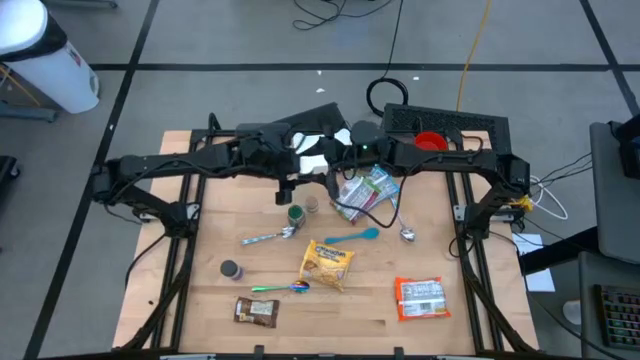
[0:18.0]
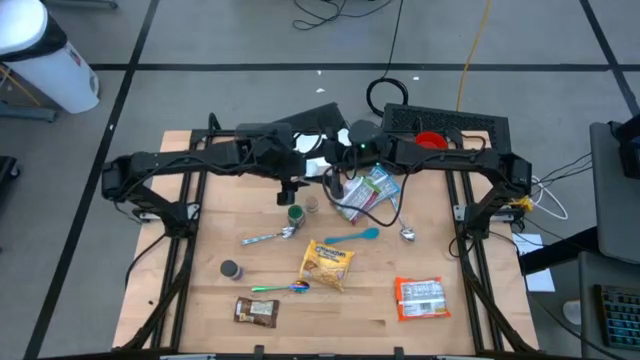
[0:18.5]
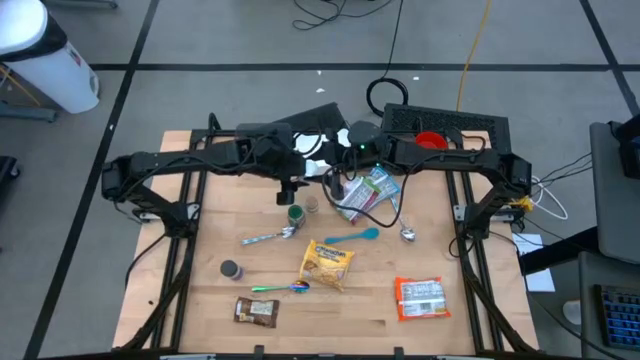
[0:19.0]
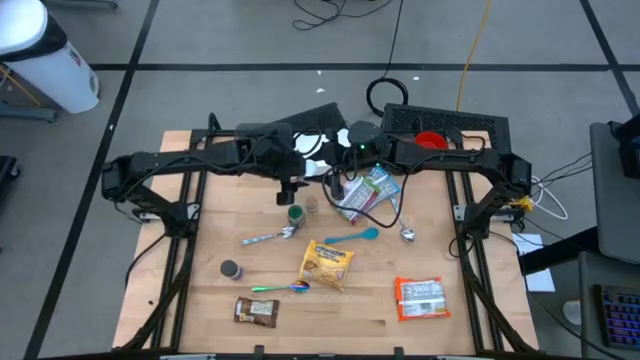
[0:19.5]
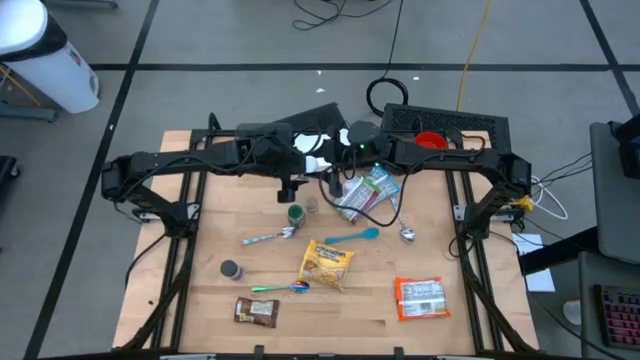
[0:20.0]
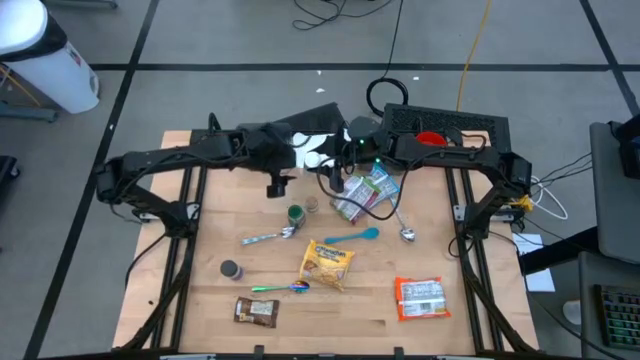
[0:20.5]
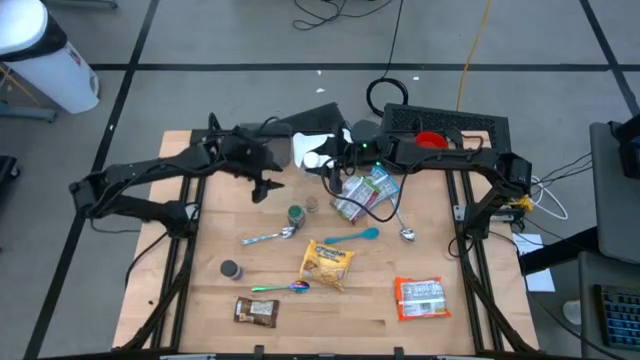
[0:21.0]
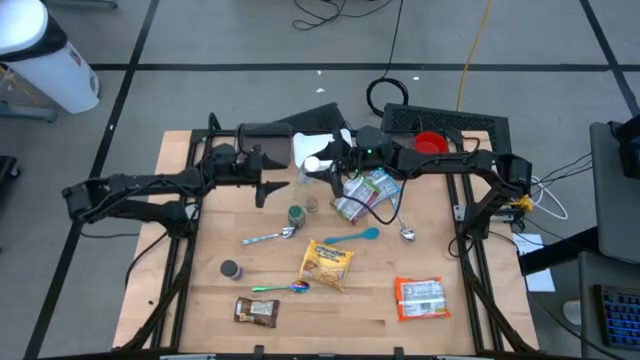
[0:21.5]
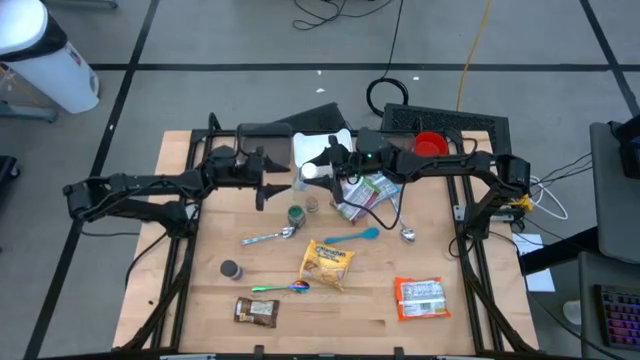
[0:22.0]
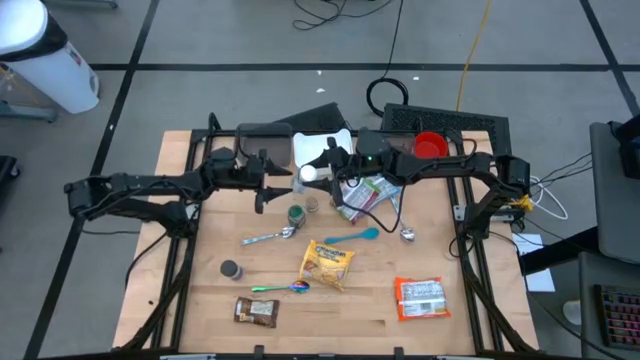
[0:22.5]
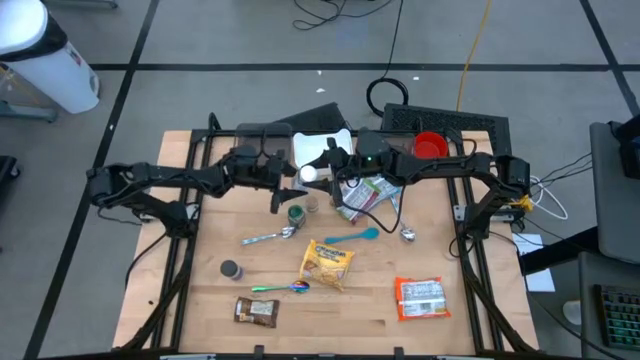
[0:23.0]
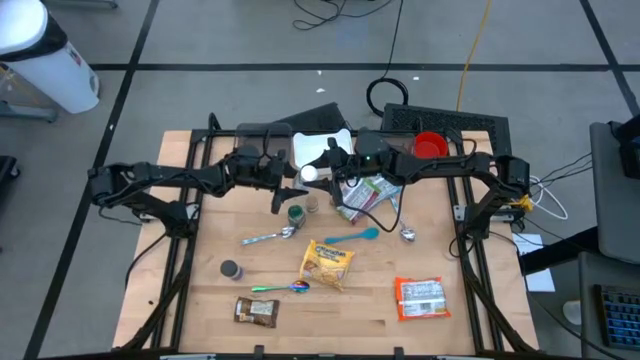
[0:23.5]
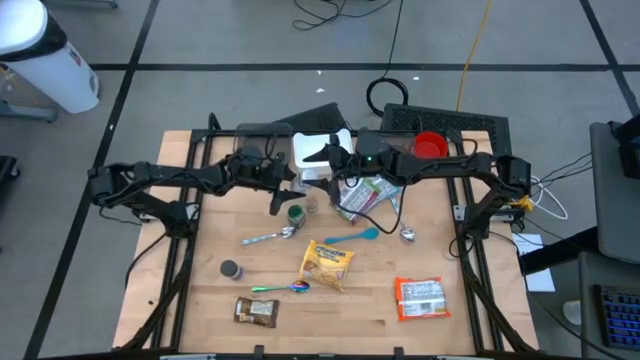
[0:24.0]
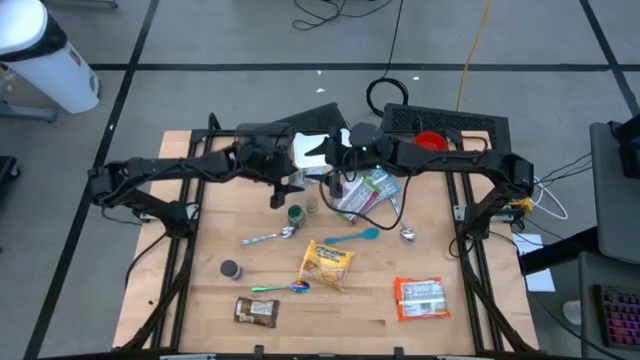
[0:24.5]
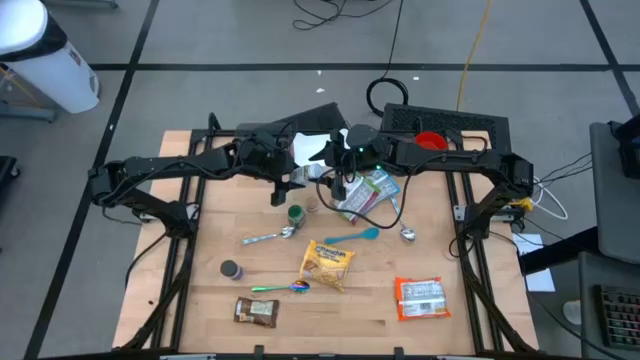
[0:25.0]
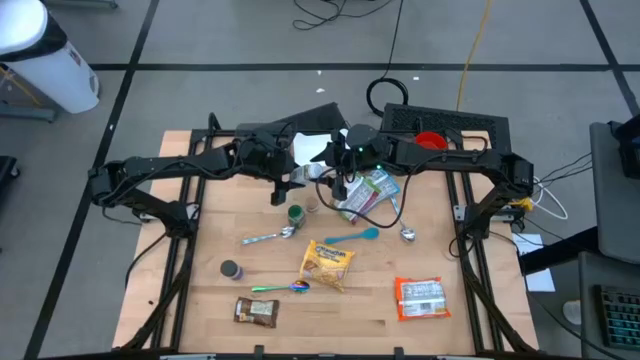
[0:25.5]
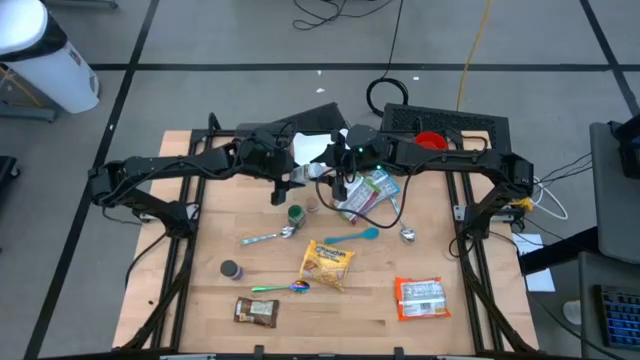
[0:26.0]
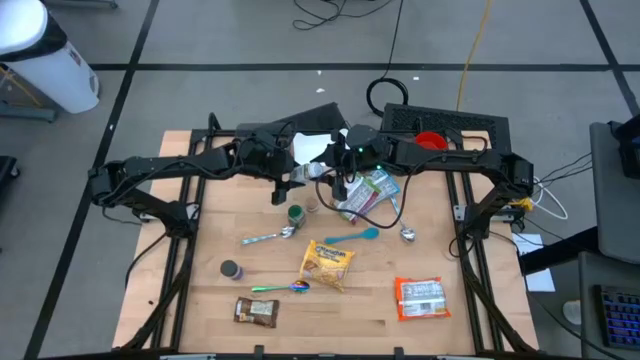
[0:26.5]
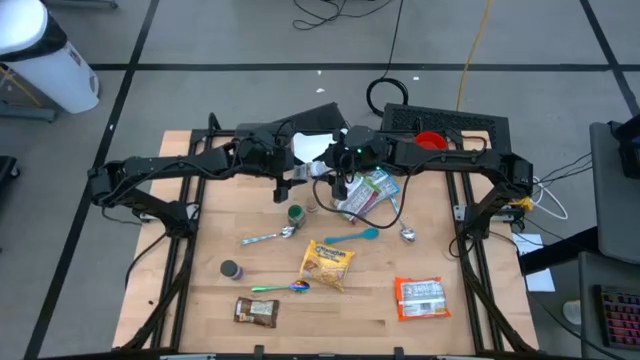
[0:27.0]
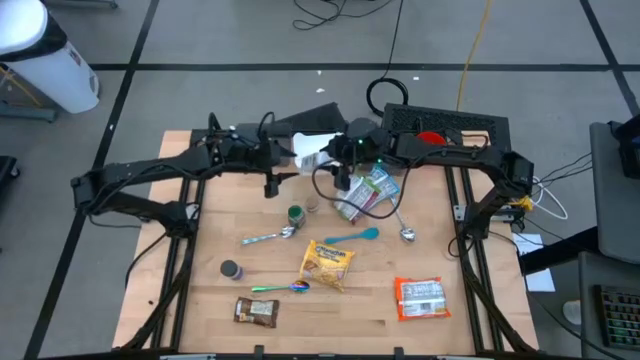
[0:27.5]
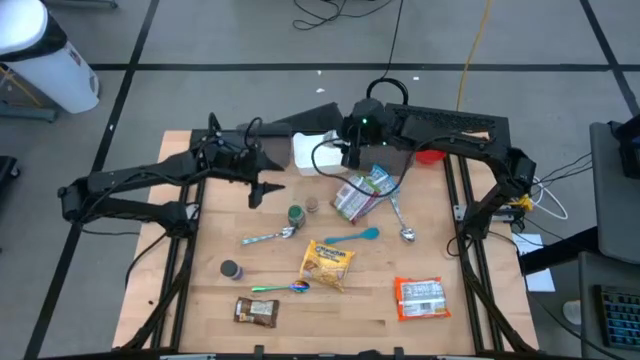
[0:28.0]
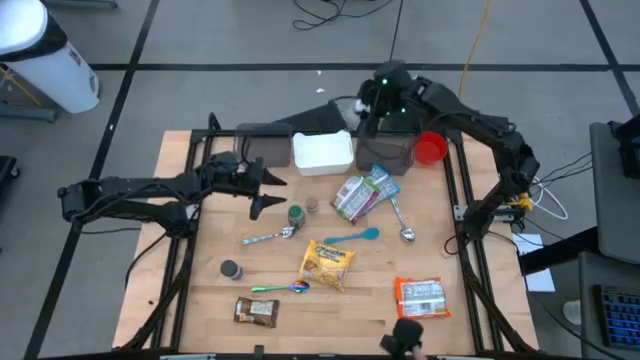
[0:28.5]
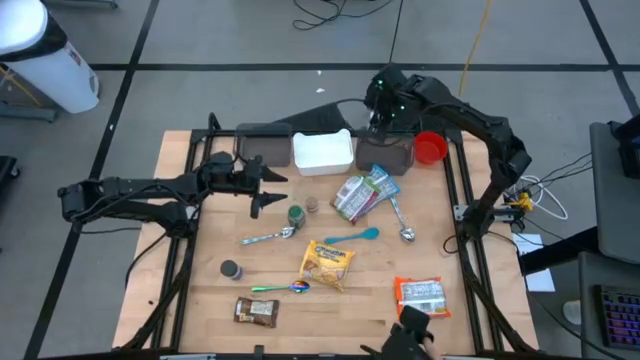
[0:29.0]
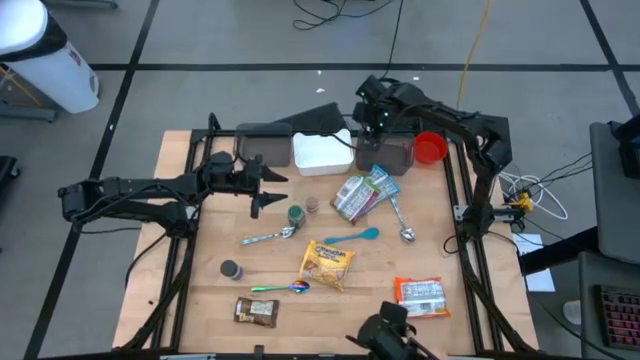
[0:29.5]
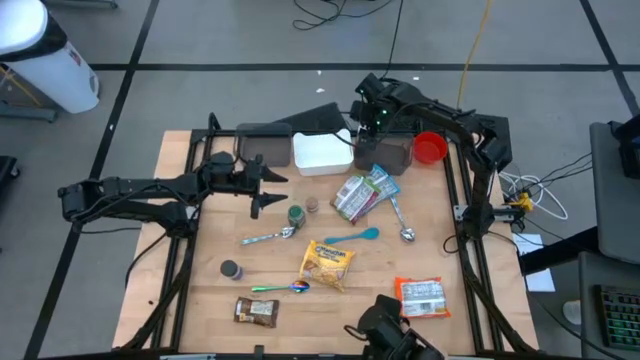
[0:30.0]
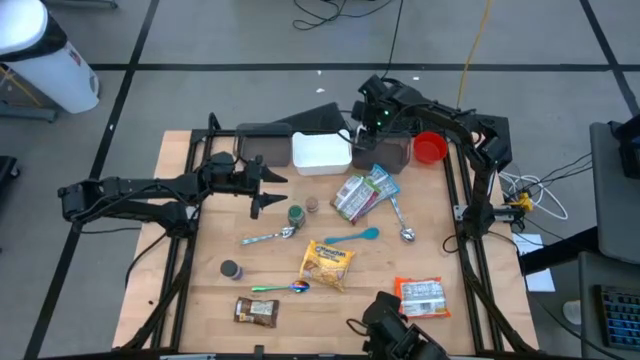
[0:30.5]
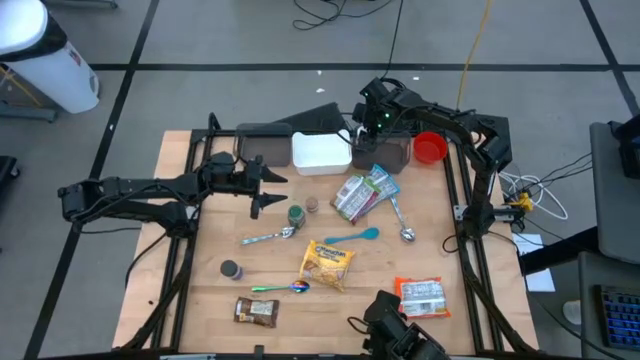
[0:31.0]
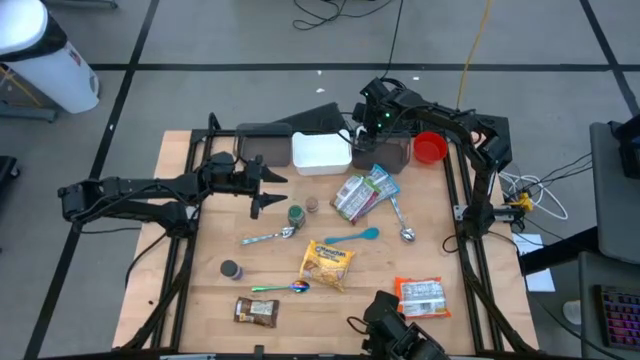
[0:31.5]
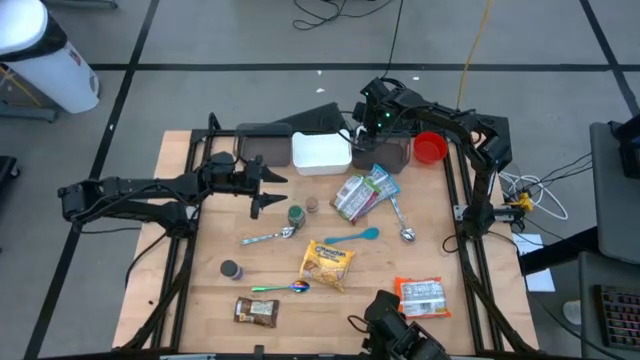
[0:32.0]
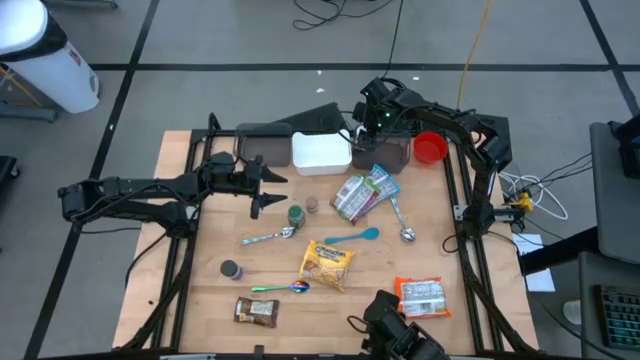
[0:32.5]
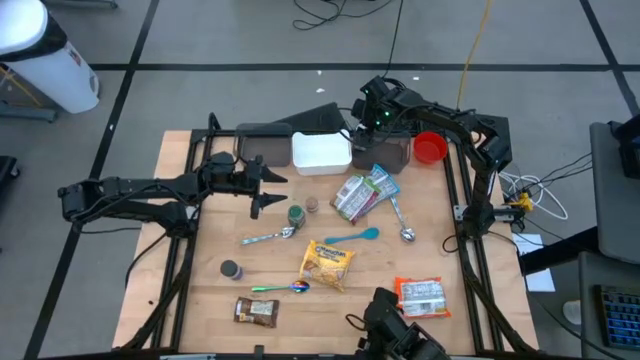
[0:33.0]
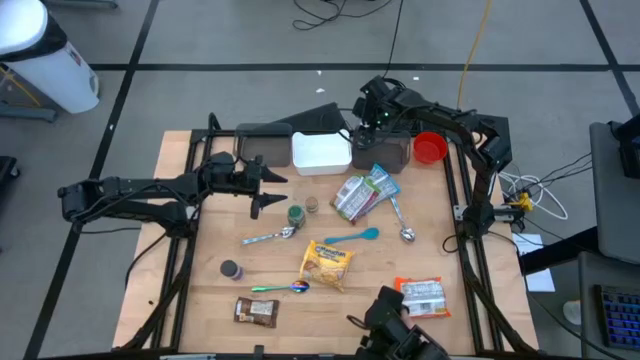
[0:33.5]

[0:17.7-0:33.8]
Task: Pick & Place Food Item
Put the white seasoning bottle into the right black bin

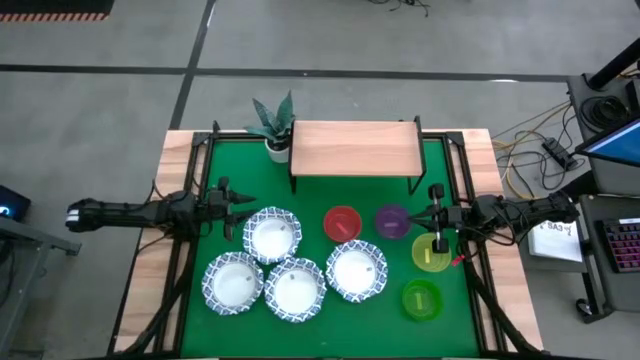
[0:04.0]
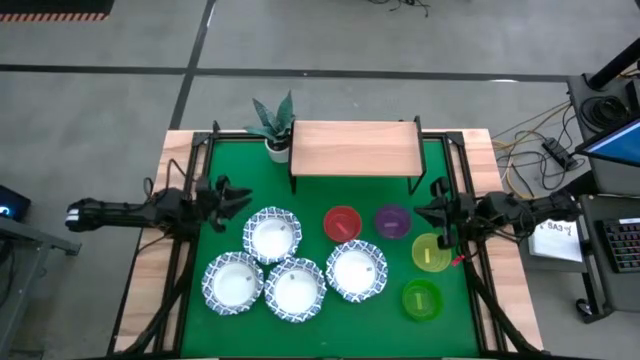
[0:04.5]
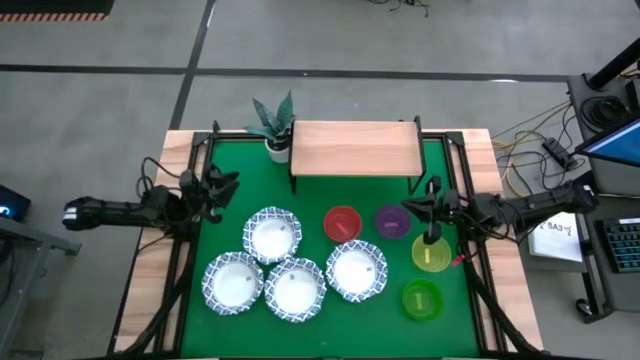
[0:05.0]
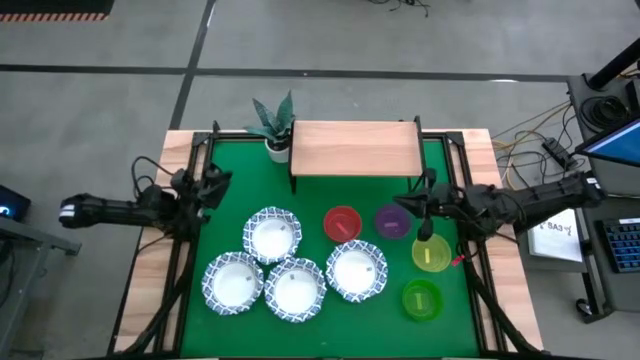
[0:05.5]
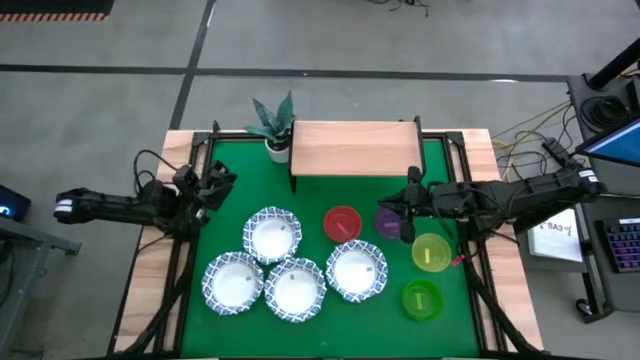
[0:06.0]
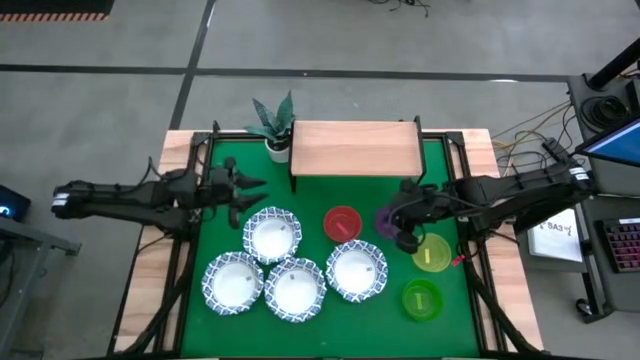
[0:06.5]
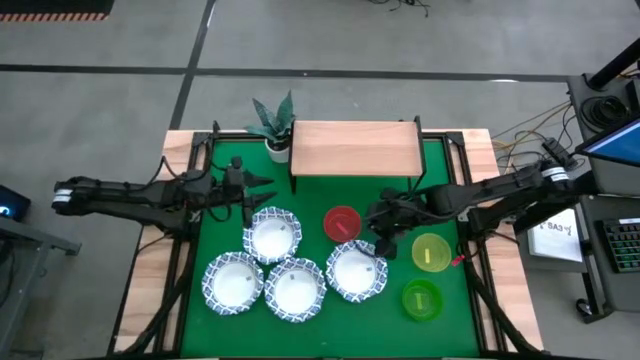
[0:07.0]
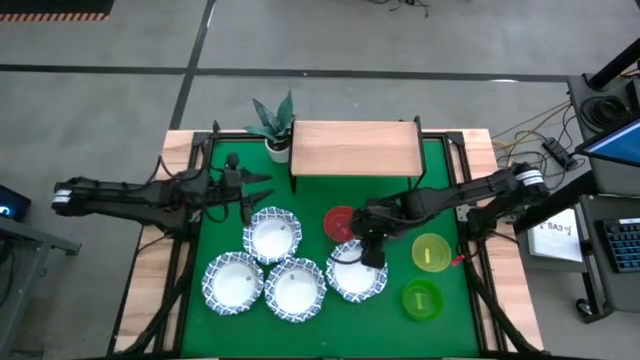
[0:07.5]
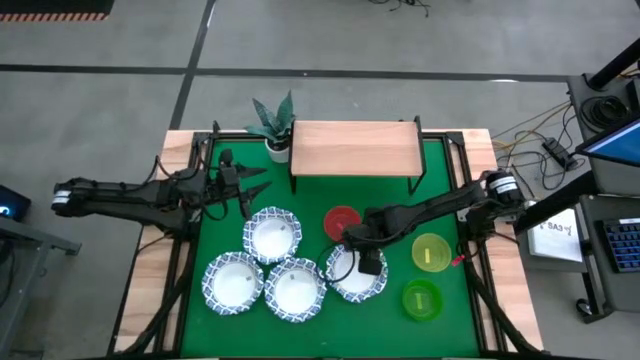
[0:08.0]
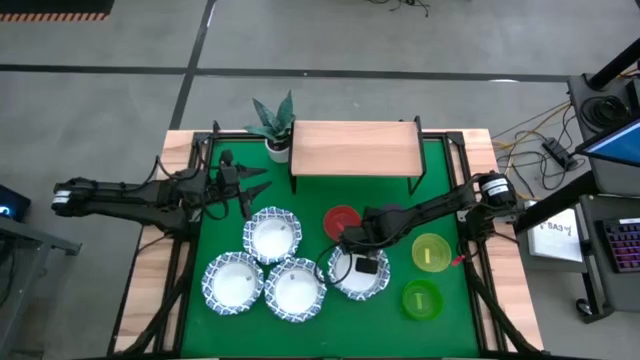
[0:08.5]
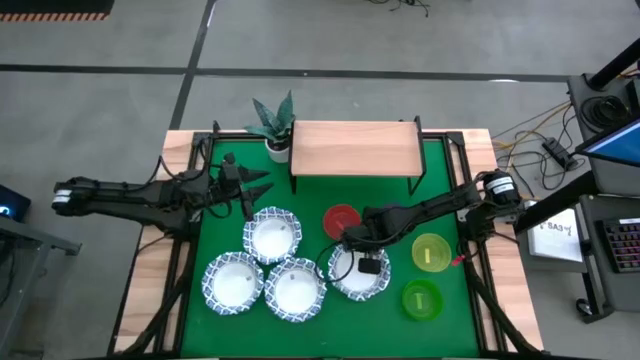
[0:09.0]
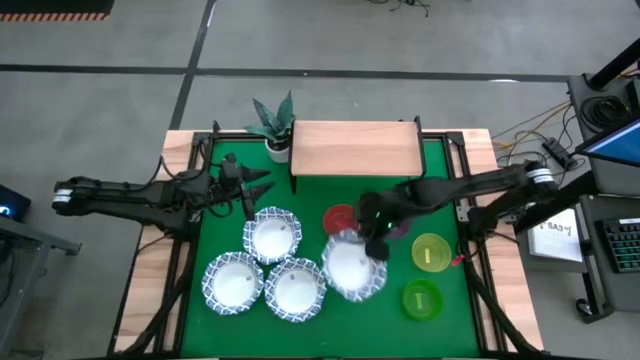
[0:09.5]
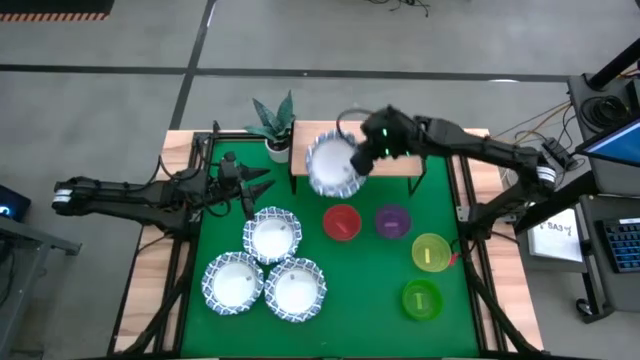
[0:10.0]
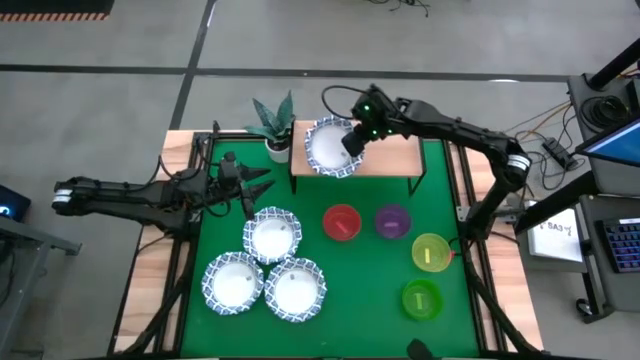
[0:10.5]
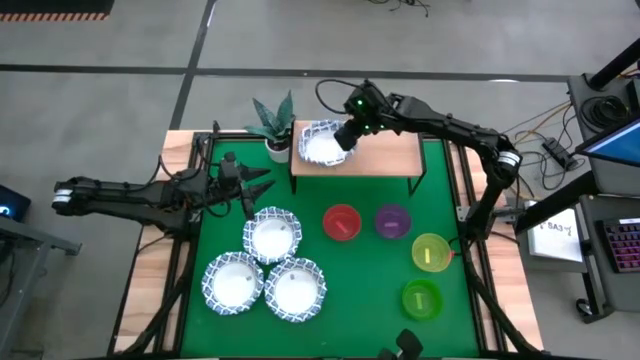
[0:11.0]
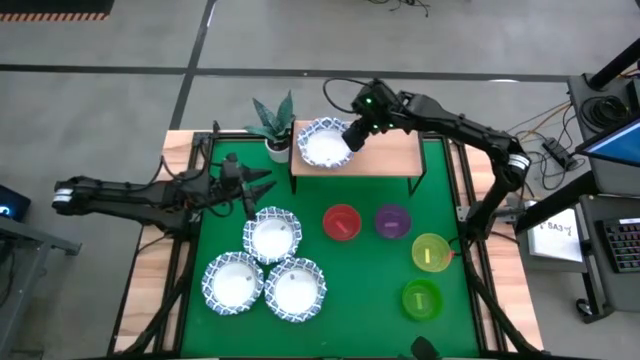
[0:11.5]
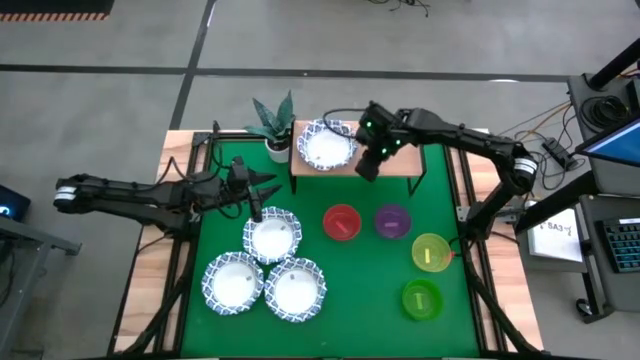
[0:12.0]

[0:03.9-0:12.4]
Task: Place and stack bowls onto a shelf
Put the white patterned bowl on the shelf
